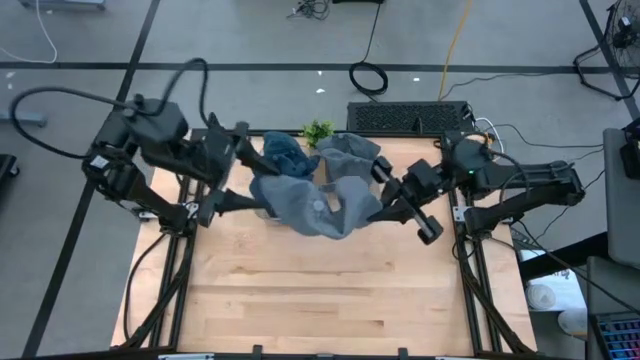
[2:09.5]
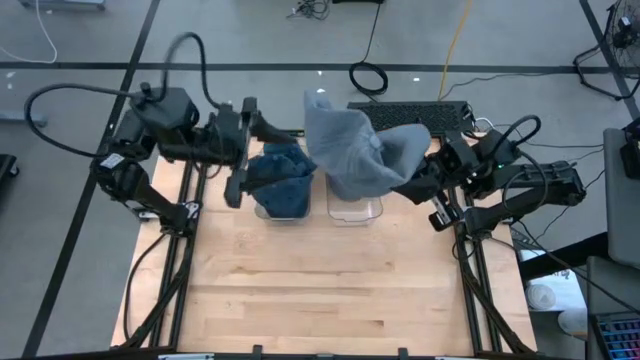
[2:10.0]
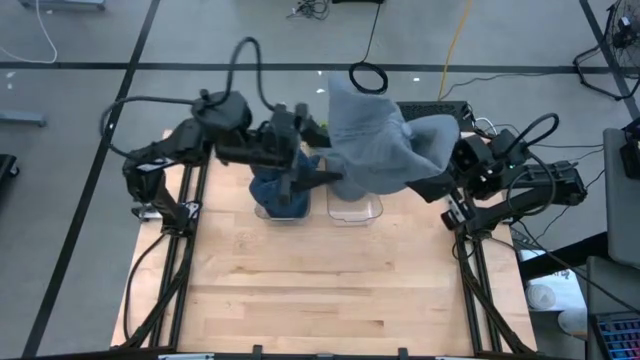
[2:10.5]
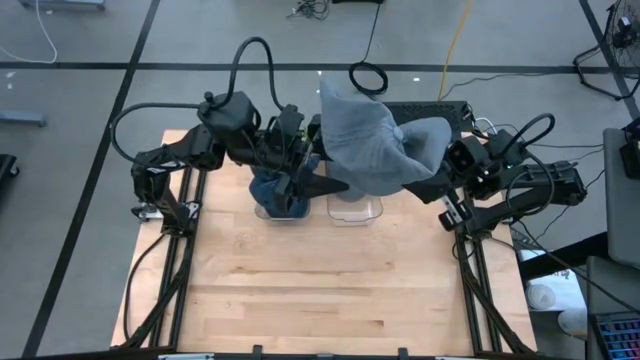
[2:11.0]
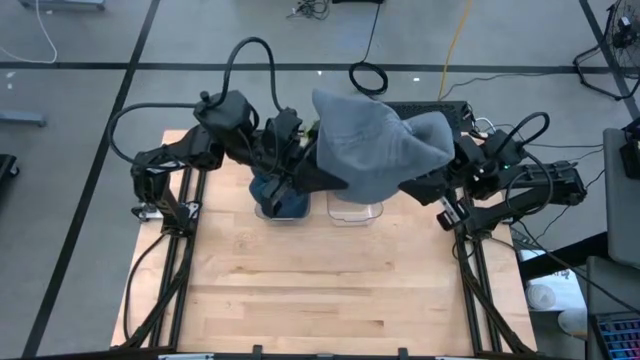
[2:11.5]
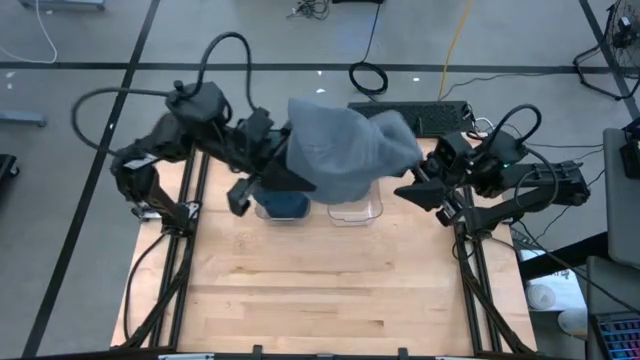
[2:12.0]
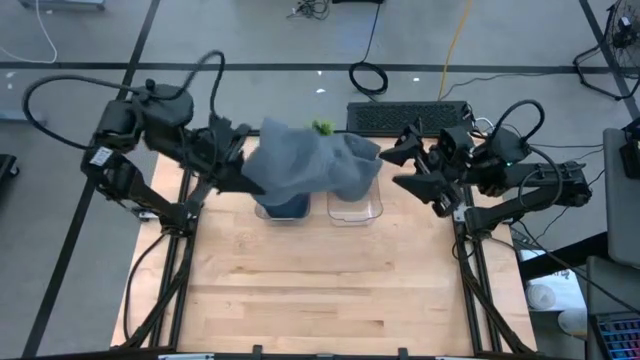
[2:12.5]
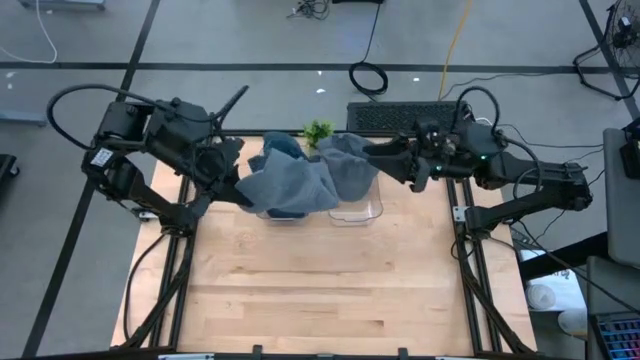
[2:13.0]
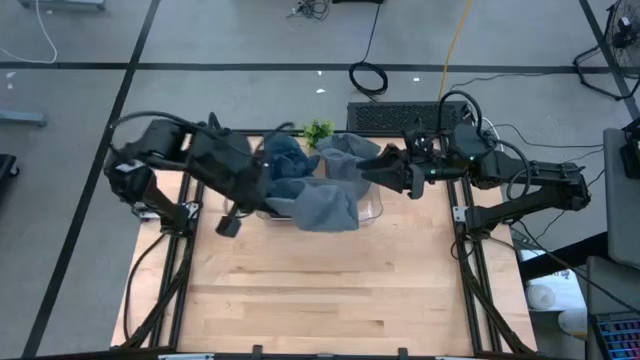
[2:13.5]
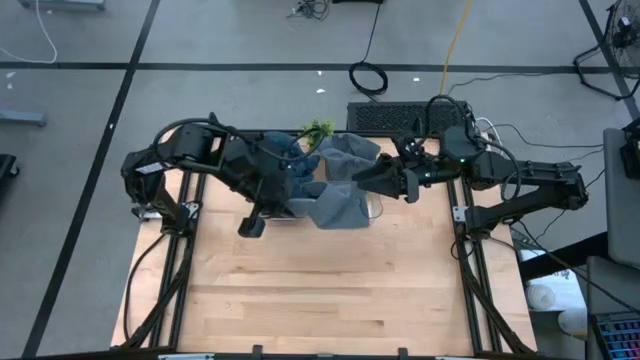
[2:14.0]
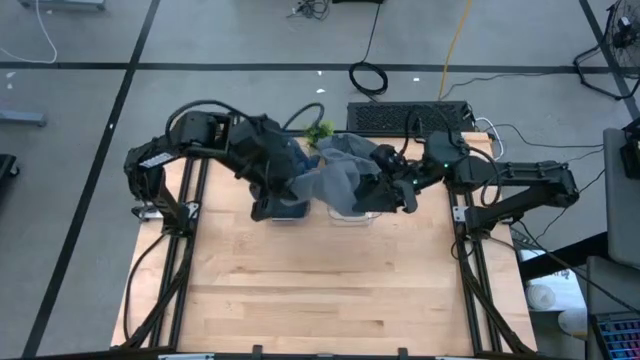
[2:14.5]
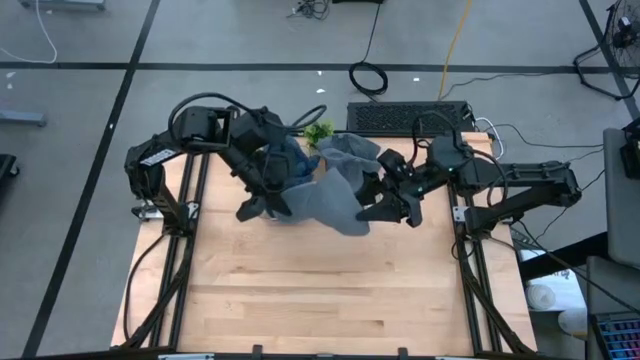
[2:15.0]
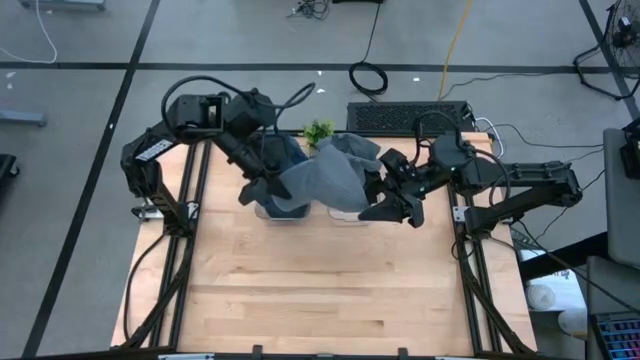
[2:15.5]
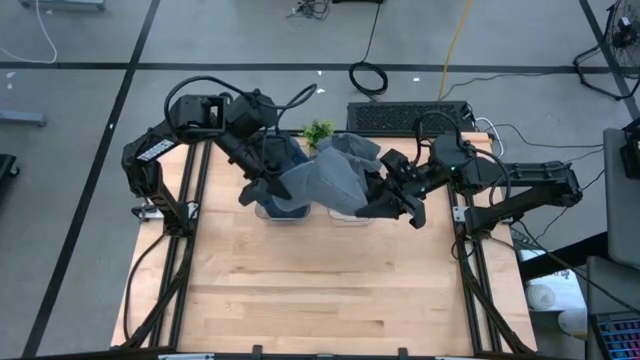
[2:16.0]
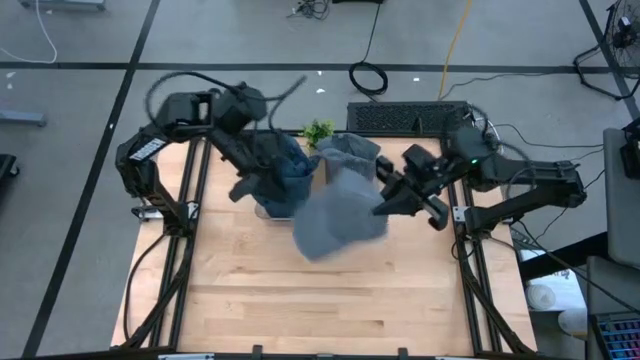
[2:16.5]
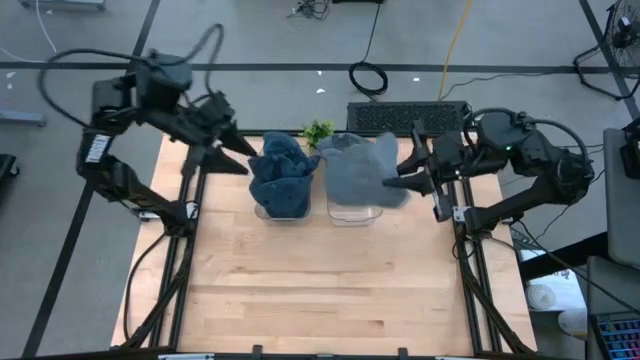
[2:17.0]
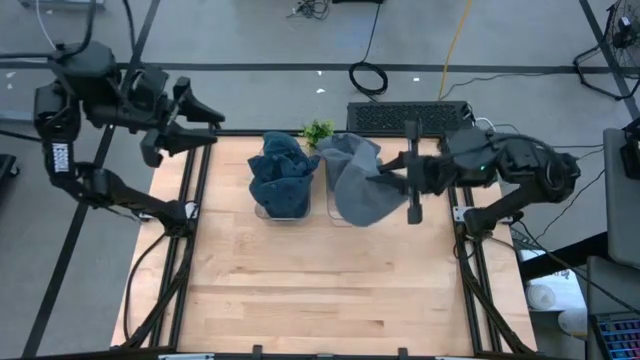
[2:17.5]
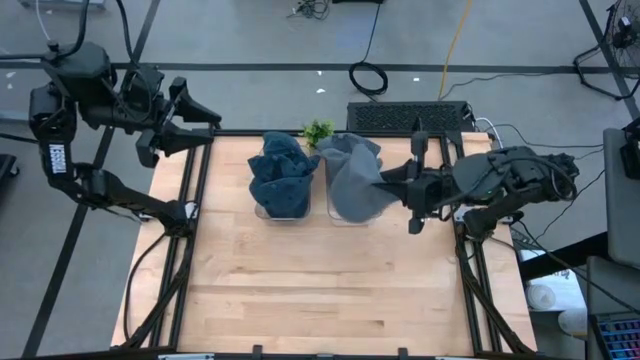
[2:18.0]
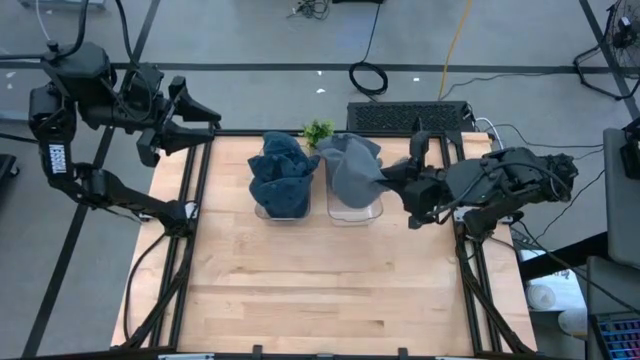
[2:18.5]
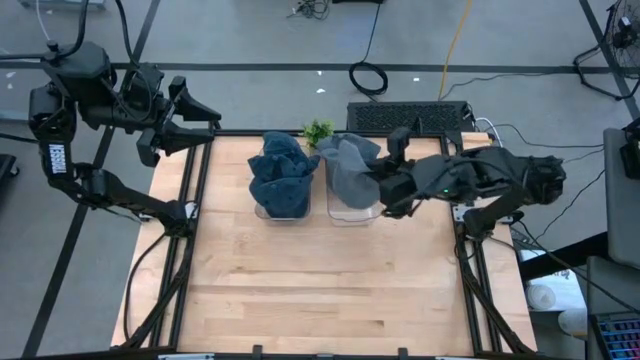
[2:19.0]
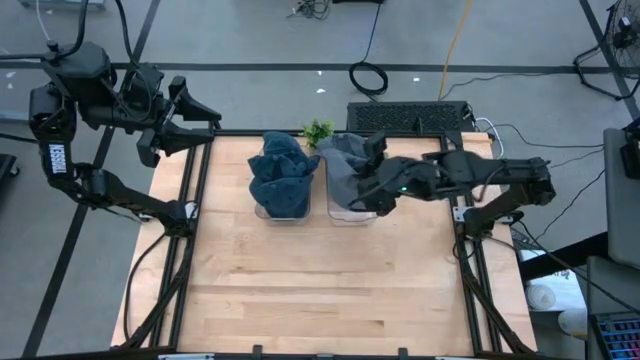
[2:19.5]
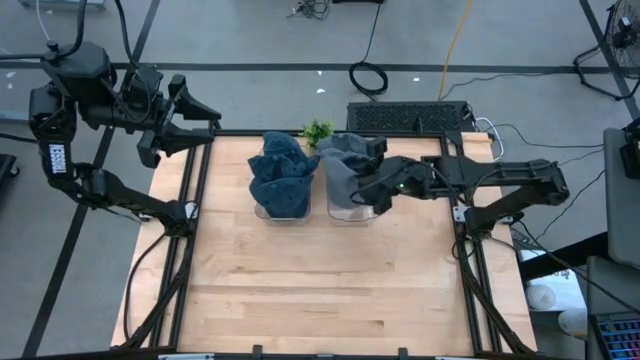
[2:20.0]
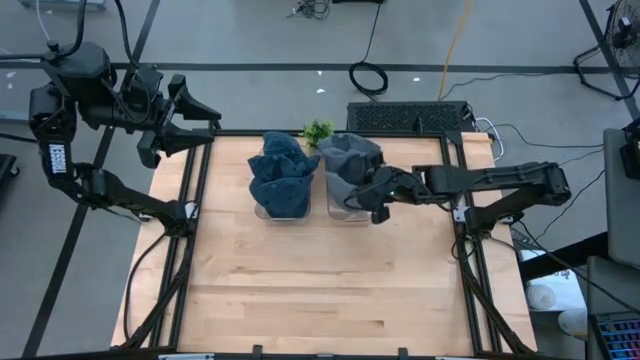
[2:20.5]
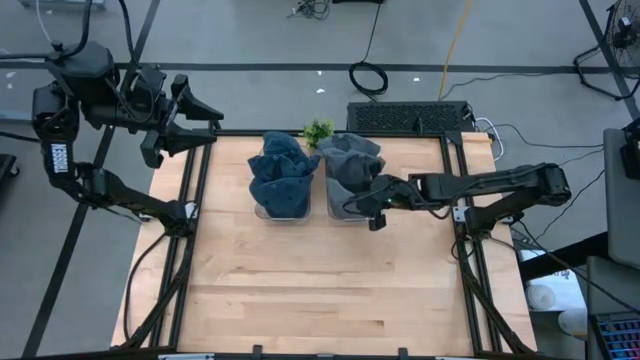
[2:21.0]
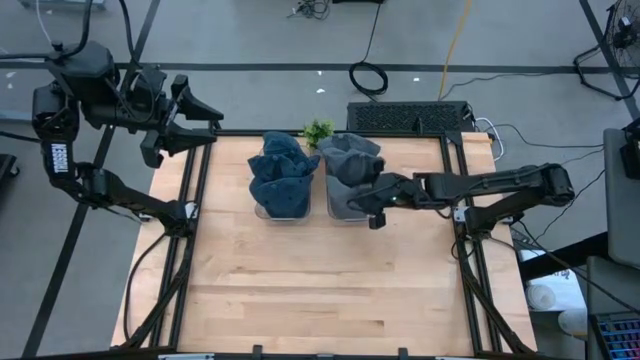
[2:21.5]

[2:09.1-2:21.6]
Task: Pick & Place hat
Put the gray cap into the right transparent bin

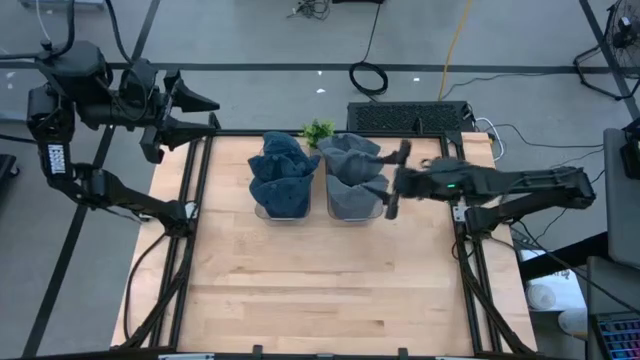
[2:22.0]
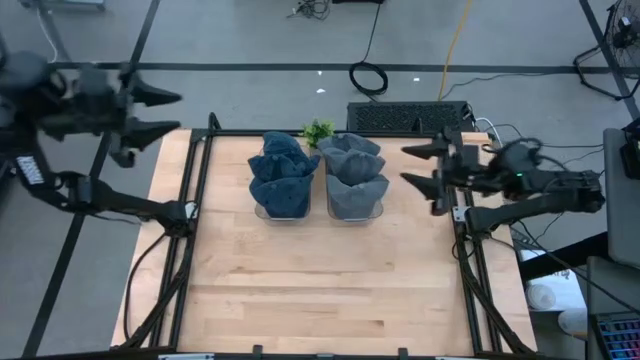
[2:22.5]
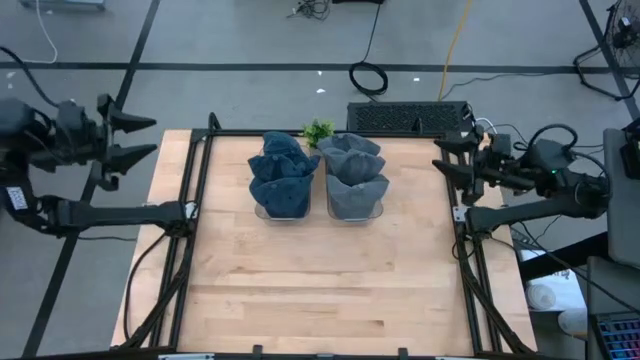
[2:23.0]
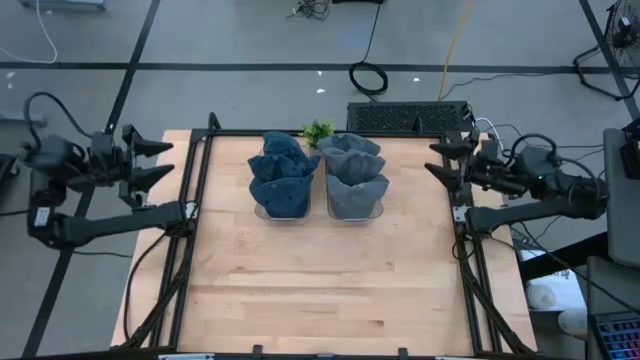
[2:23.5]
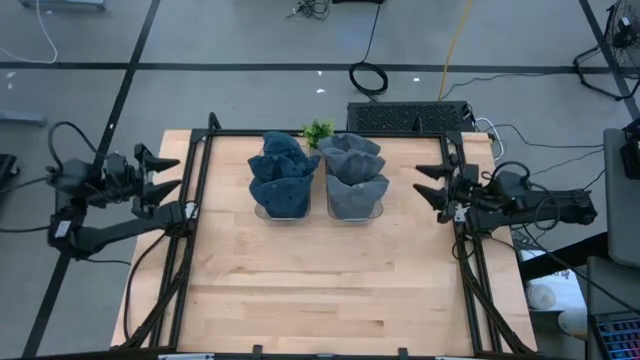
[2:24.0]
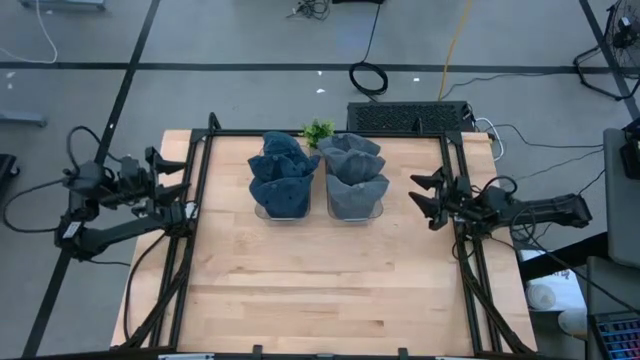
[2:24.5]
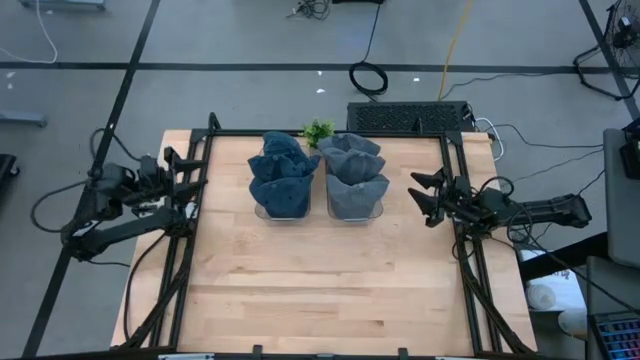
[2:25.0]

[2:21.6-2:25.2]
Return to Home Position

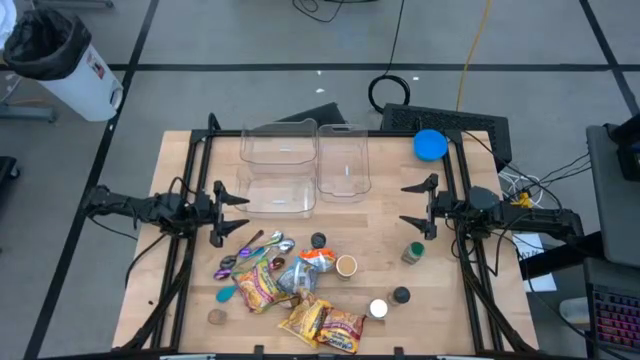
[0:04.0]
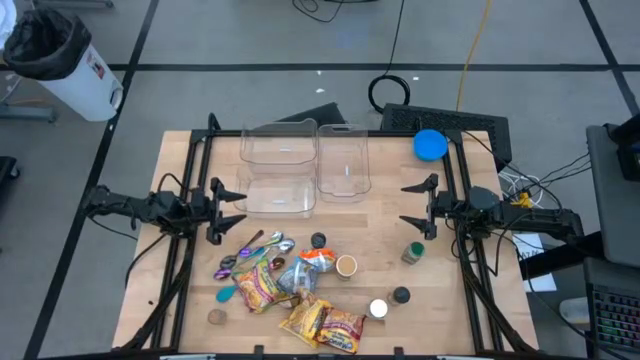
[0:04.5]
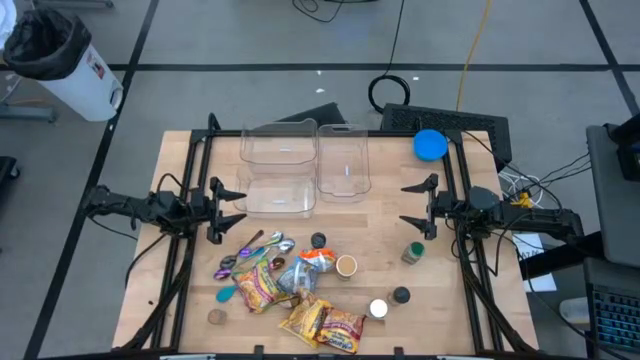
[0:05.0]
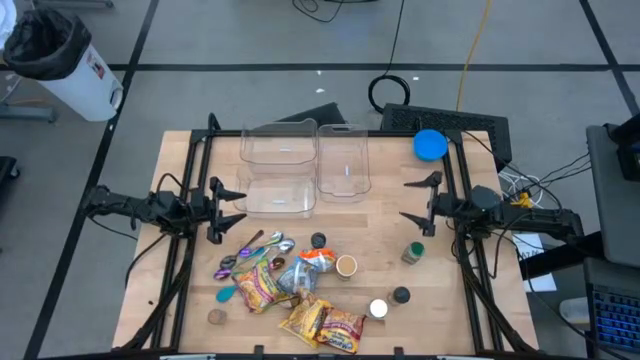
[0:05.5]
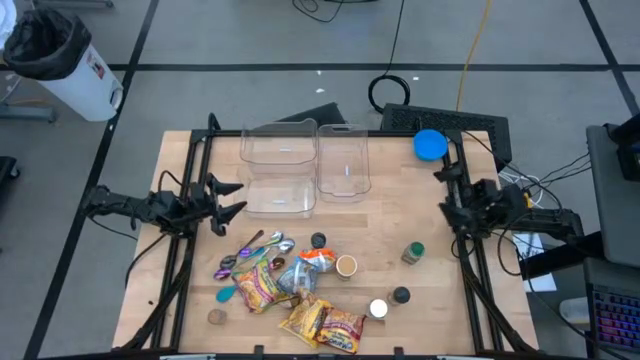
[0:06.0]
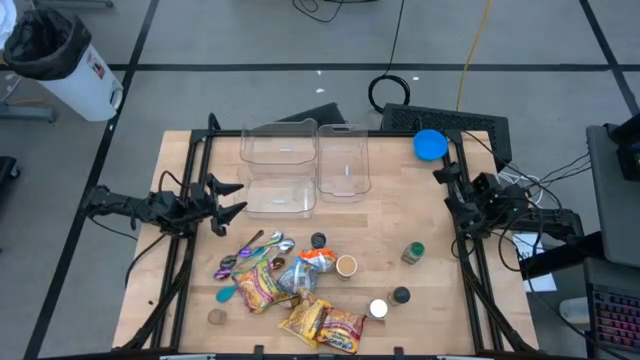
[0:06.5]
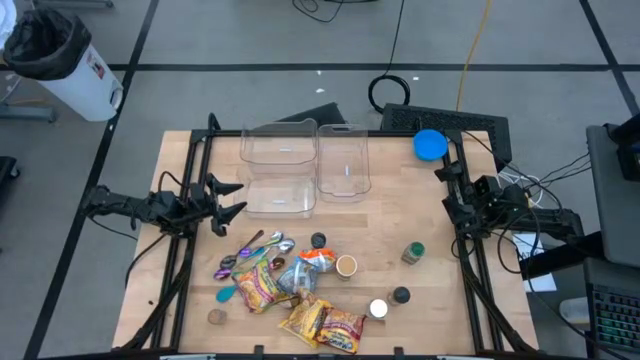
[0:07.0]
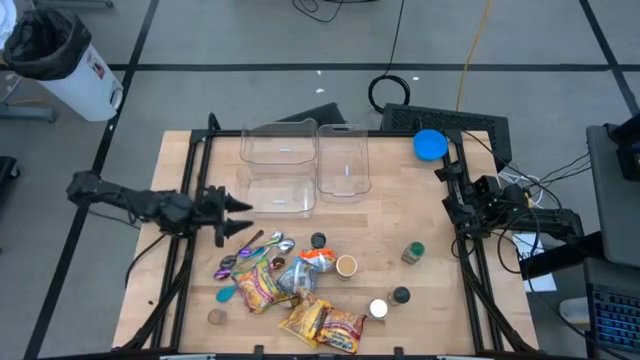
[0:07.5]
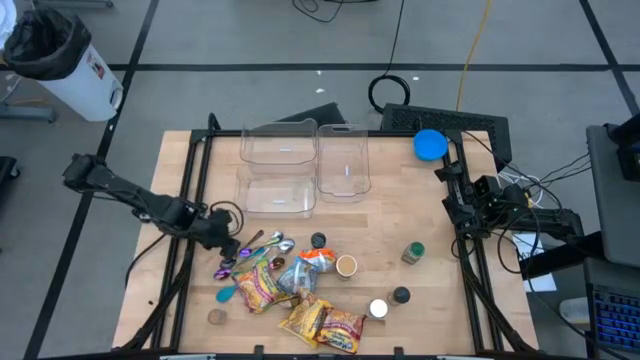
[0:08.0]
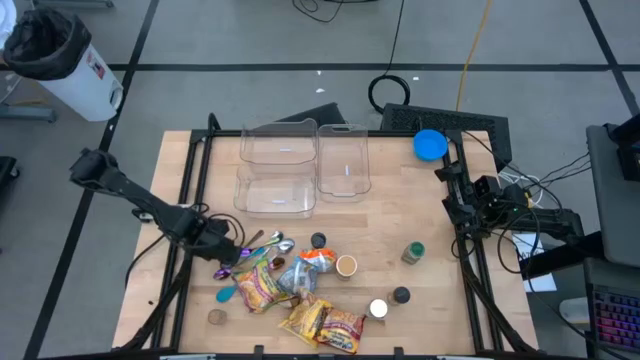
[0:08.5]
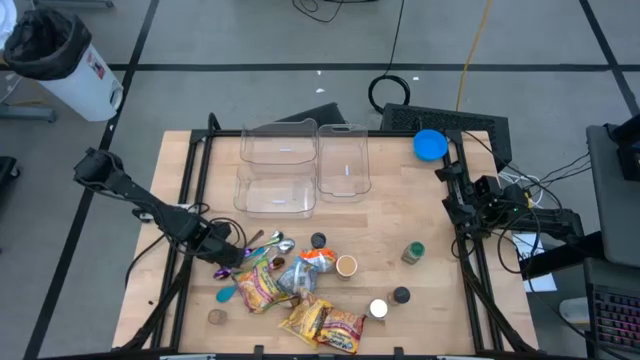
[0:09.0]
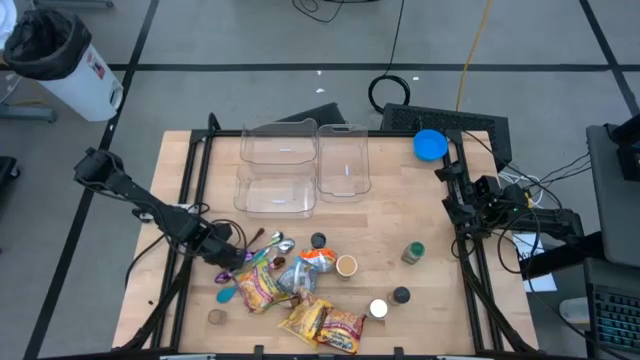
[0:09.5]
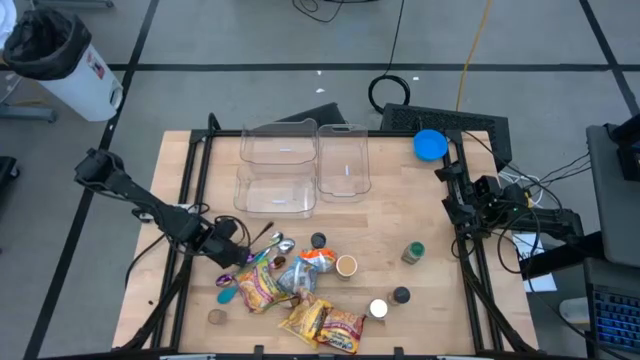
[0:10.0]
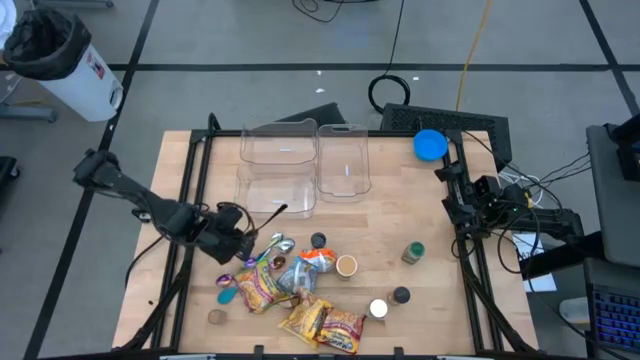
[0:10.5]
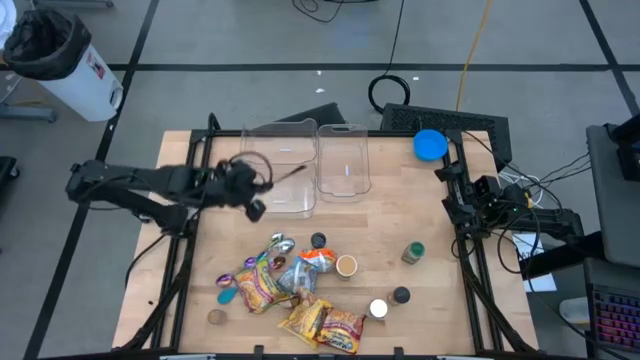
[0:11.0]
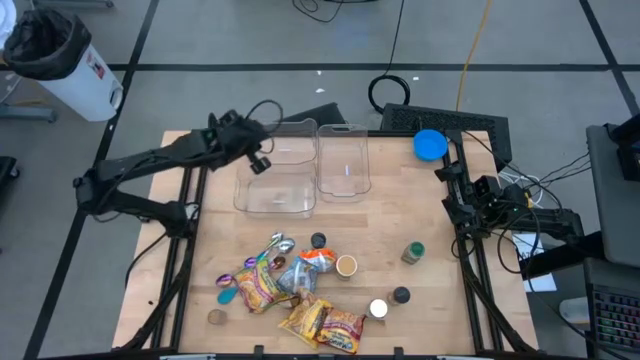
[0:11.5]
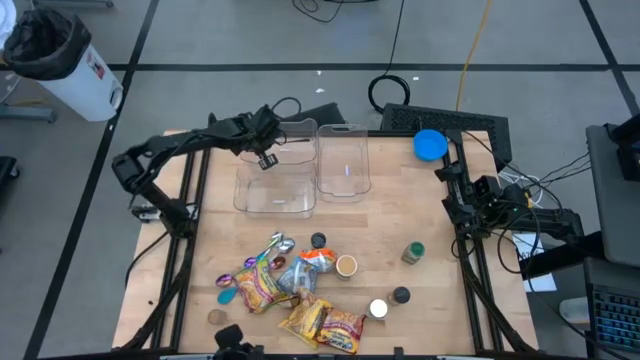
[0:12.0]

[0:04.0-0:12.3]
Task: Pick & Place Food Item
Put the black spoon into the top left transparent bin
